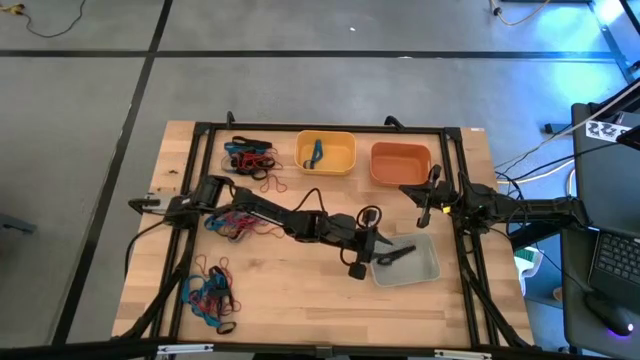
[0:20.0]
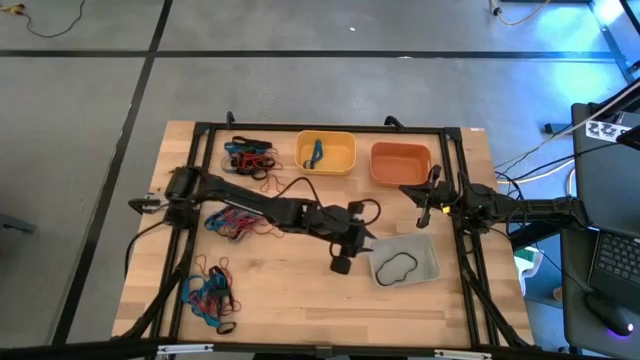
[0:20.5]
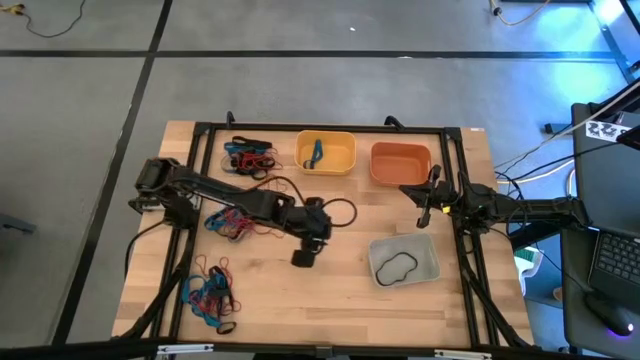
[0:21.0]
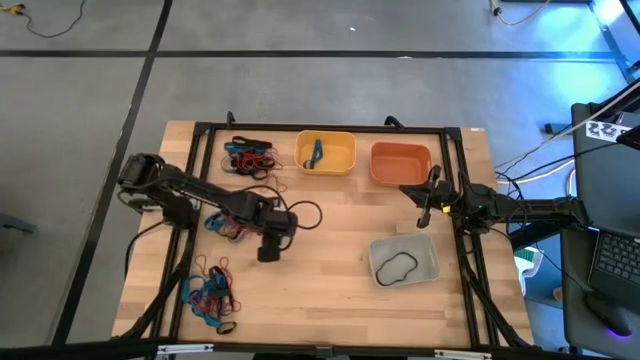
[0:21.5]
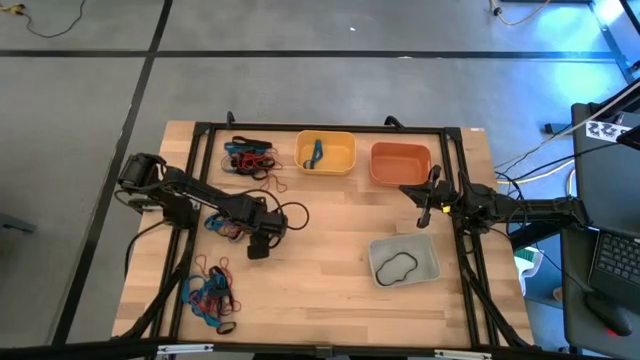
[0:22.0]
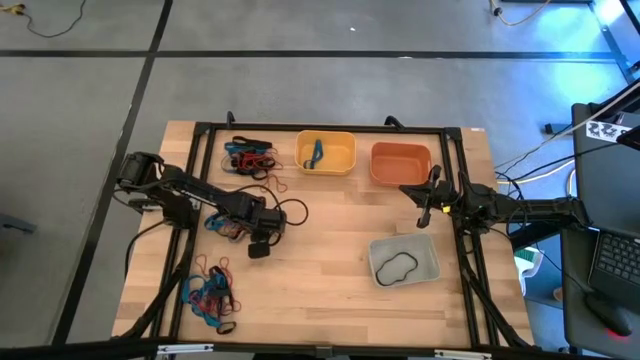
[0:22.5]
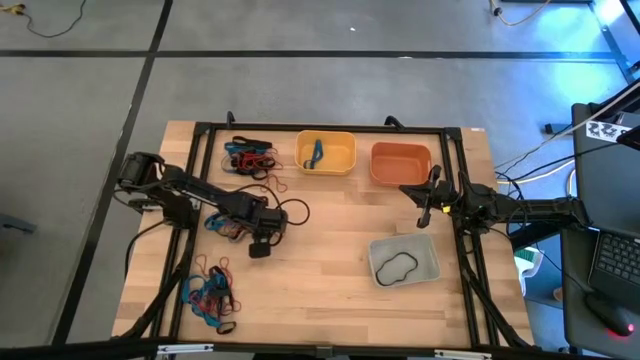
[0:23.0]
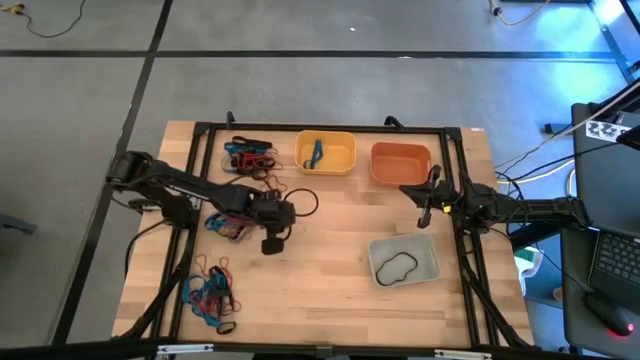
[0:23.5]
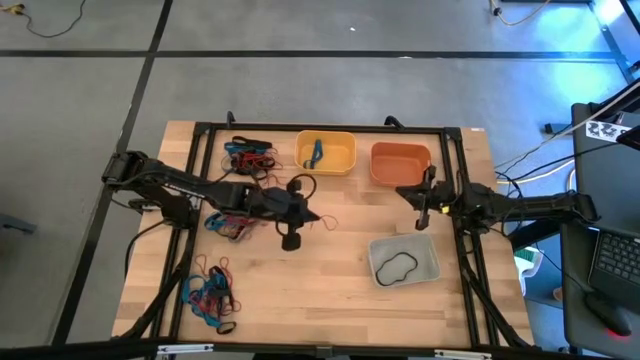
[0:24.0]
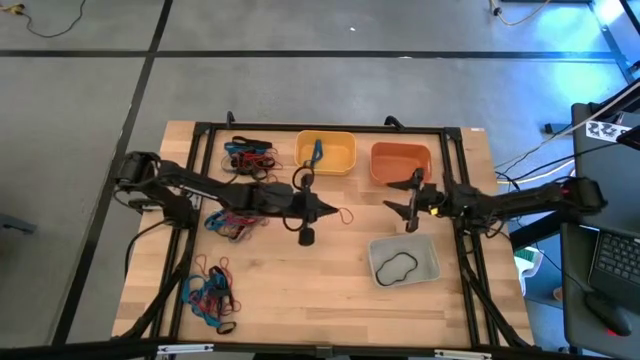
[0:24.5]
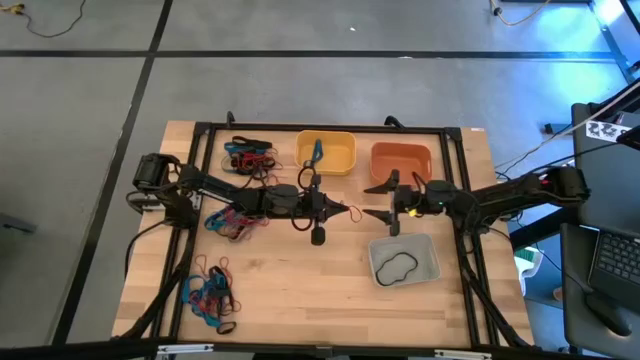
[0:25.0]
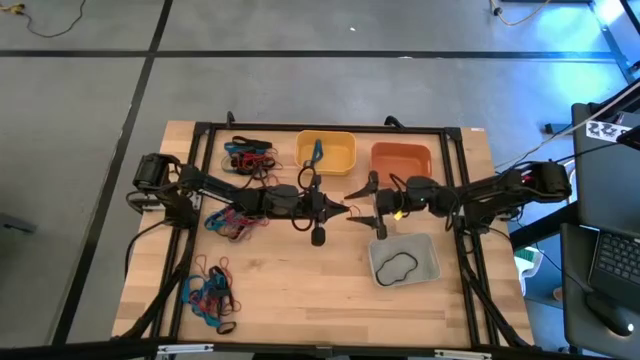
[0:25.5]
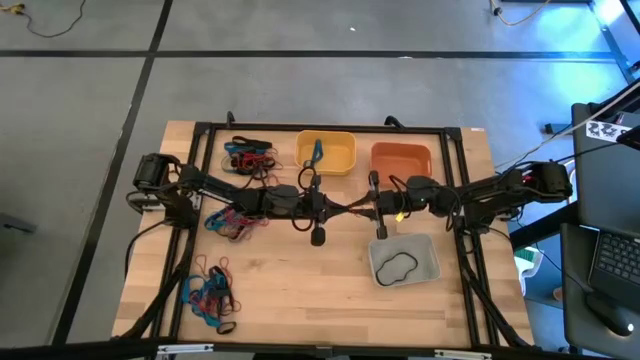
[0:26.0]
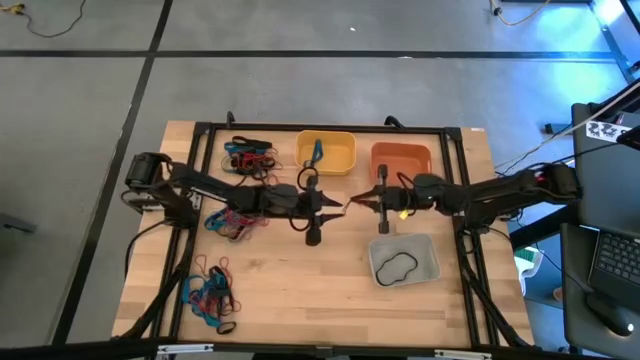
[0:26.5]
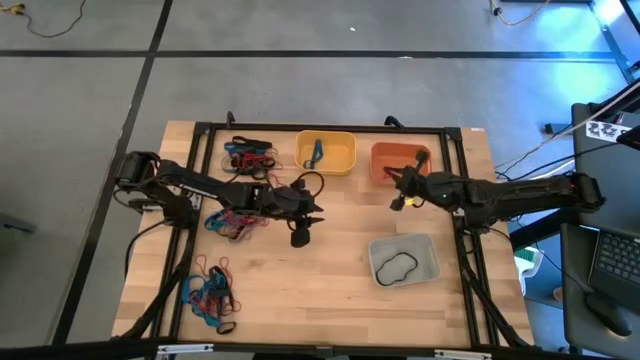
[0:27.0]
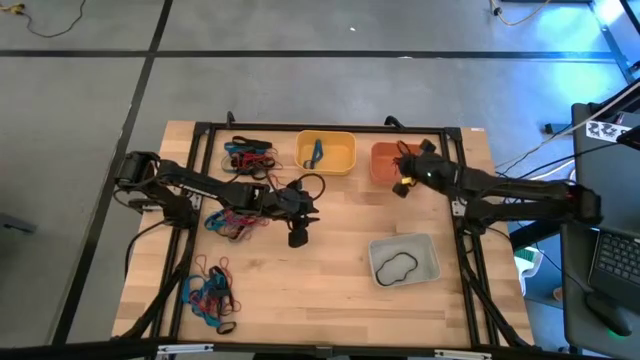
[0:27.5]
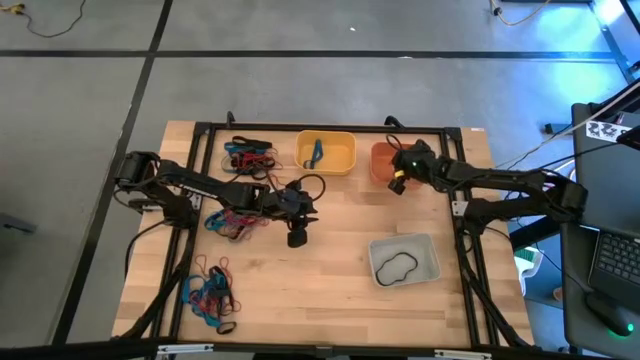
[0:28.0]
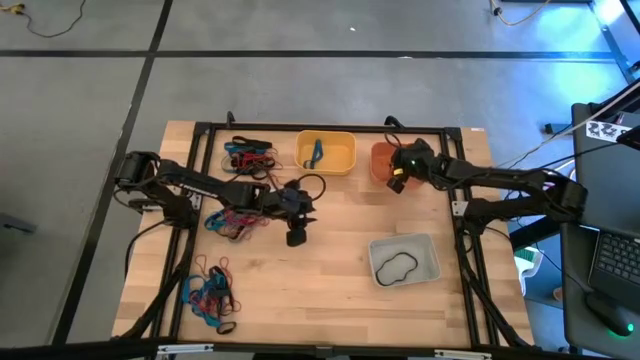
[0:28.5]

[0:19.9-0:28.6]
Task: Sort rubber bands into baskets
Put the red rubber band into the orange bin

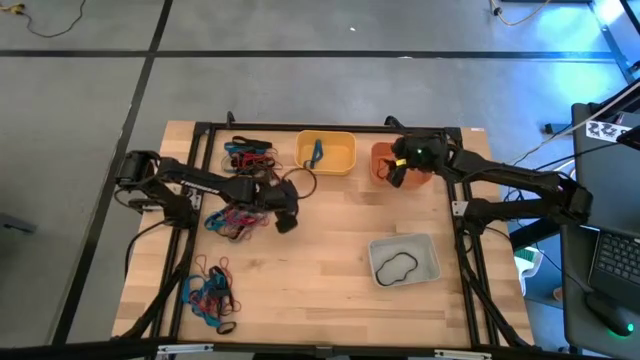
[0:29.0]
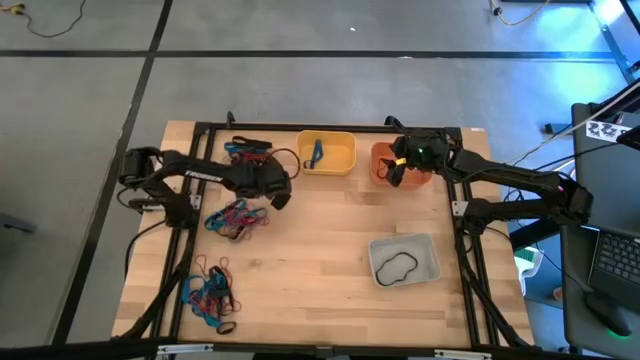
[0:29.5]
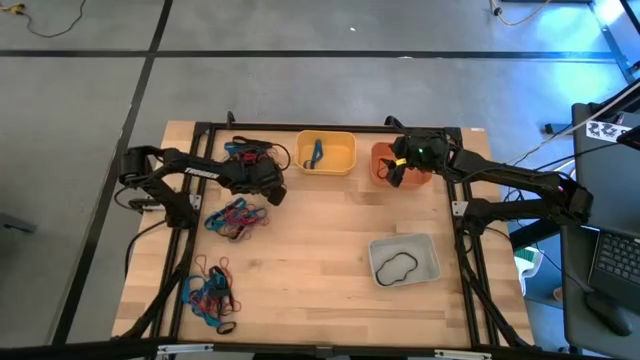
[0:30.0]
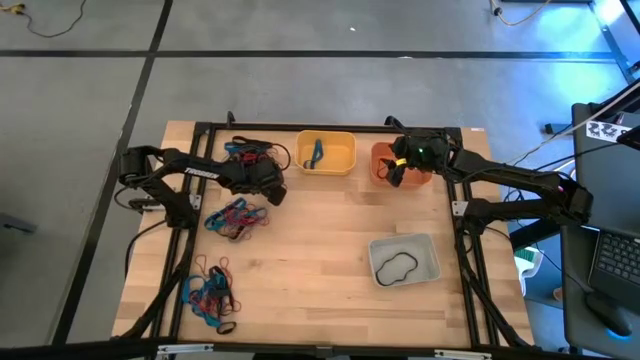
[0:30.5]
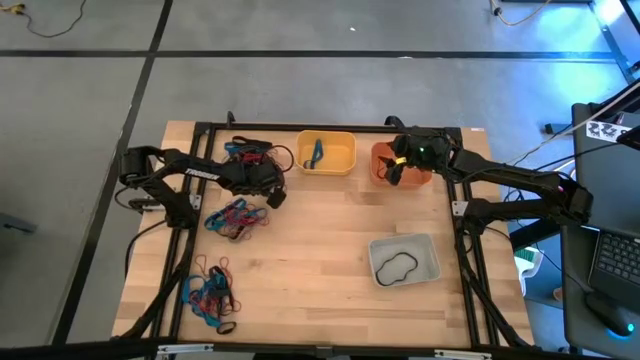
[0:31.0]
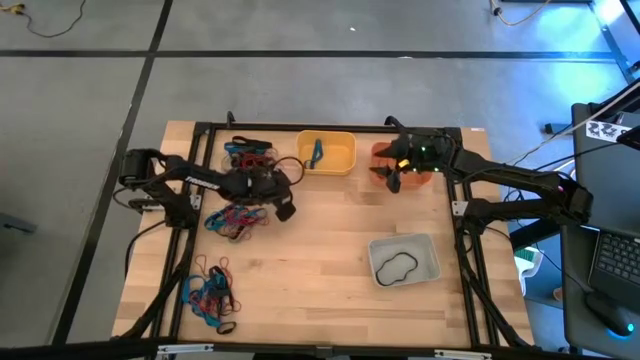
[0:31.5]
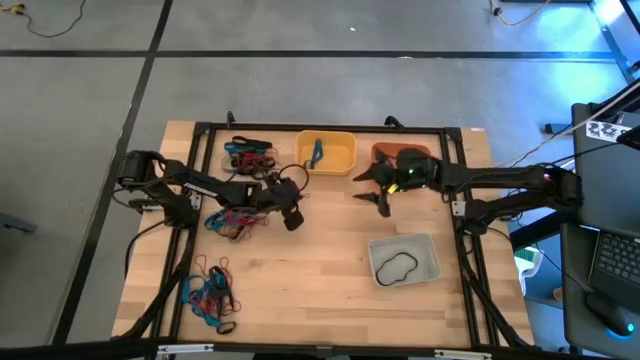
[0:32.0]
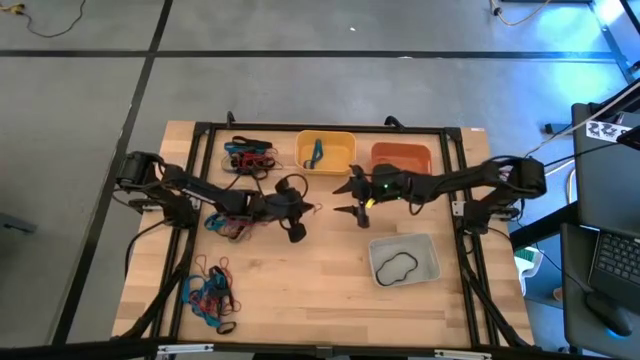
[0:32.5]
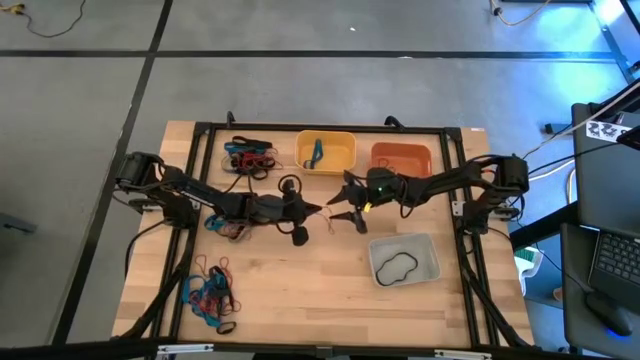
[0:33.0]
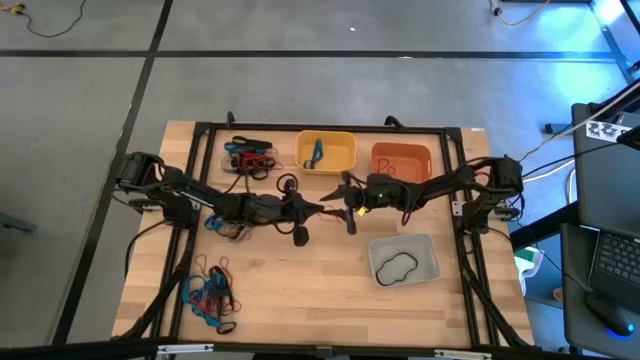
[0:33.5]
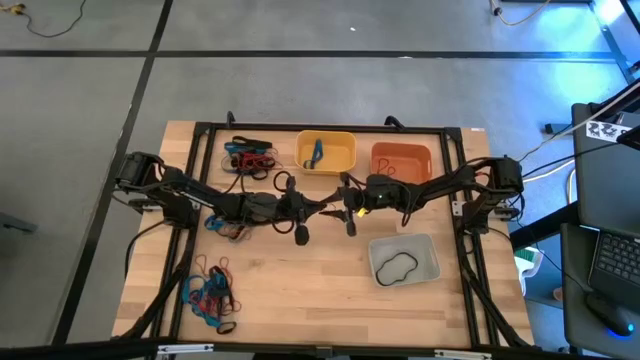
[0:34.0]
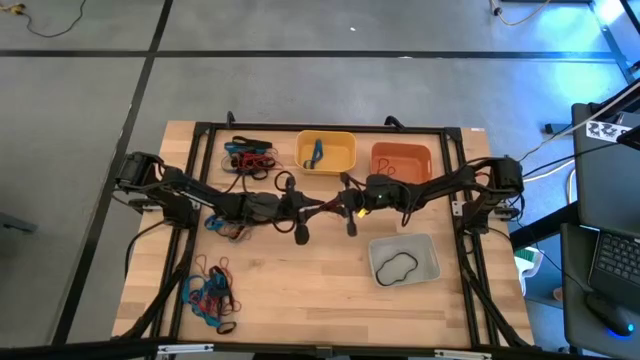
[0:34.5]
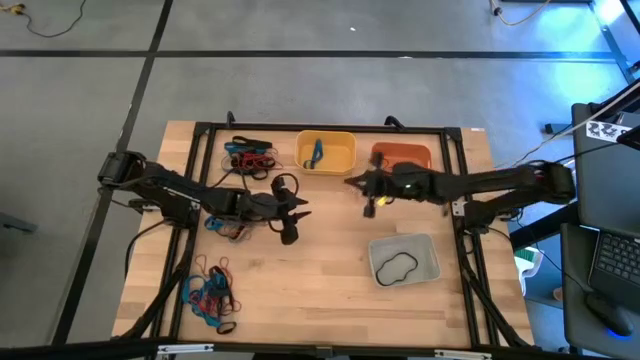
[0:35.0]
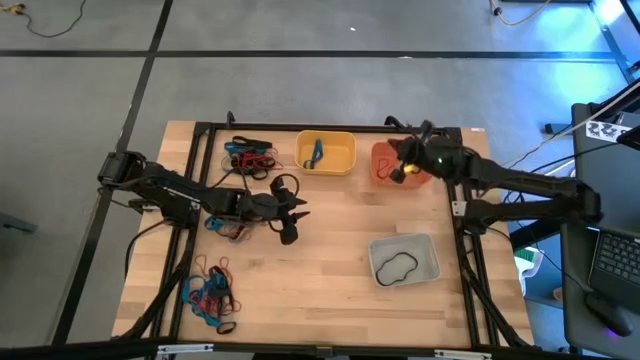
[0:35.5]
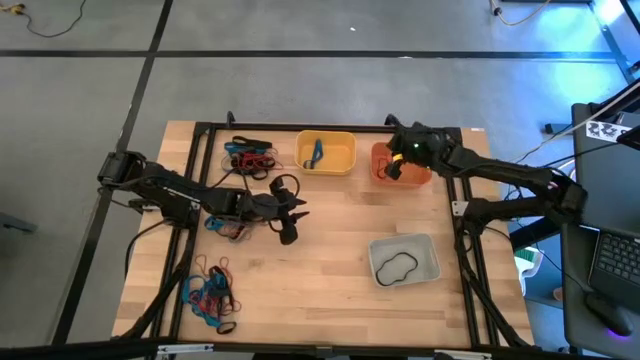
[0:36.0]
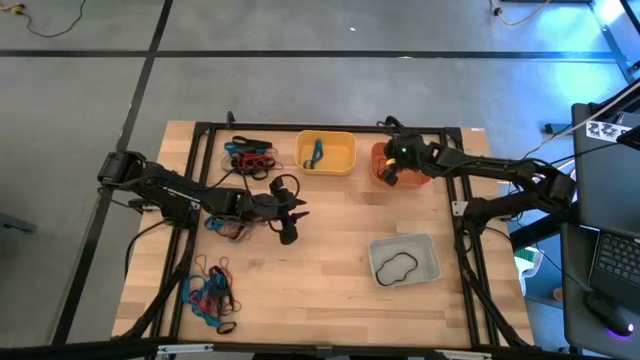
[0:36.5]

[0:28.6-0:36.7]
Put the red rubber band into the orange bin

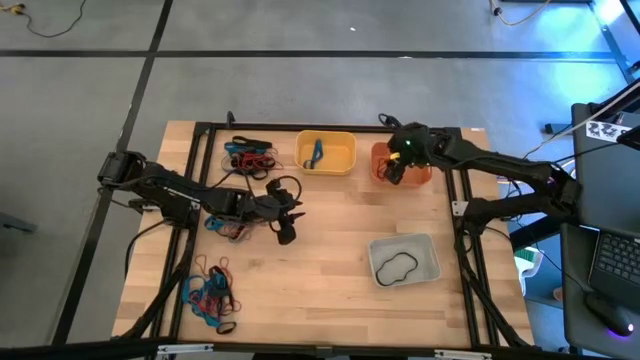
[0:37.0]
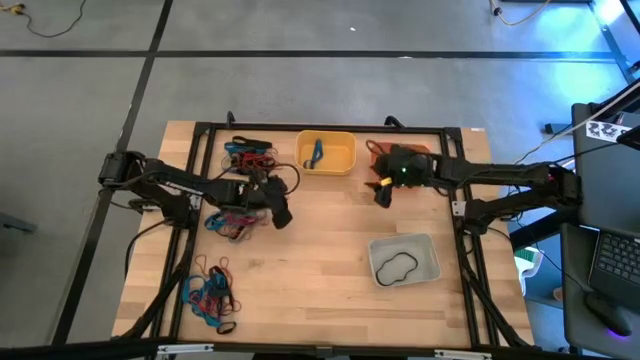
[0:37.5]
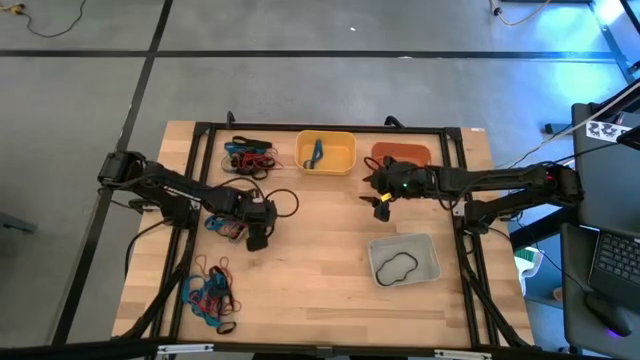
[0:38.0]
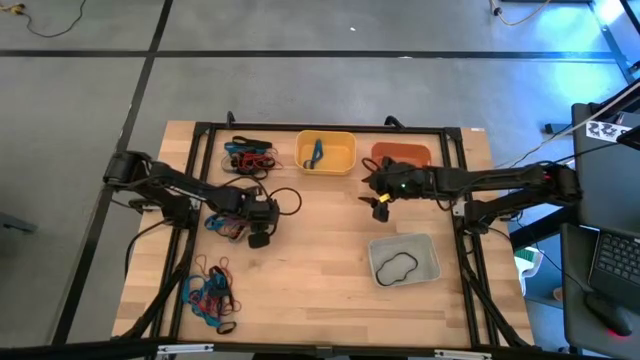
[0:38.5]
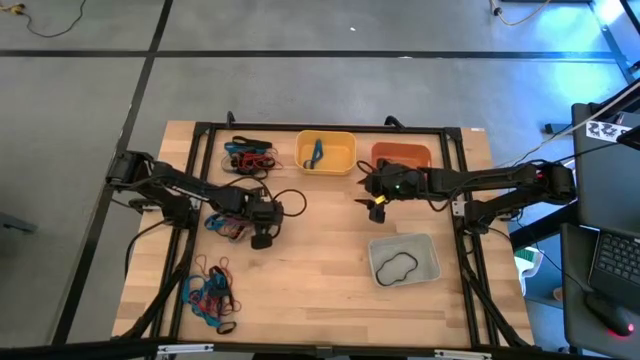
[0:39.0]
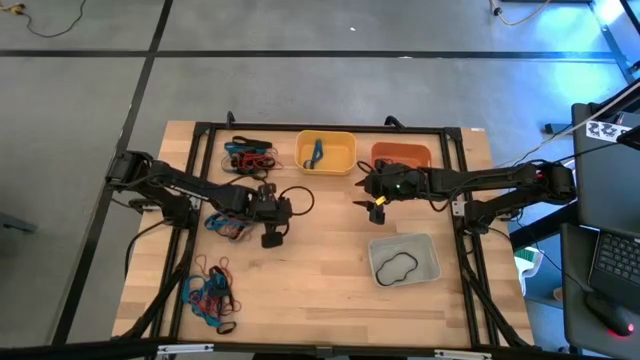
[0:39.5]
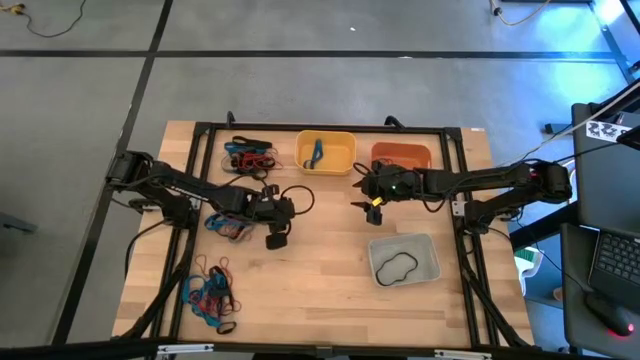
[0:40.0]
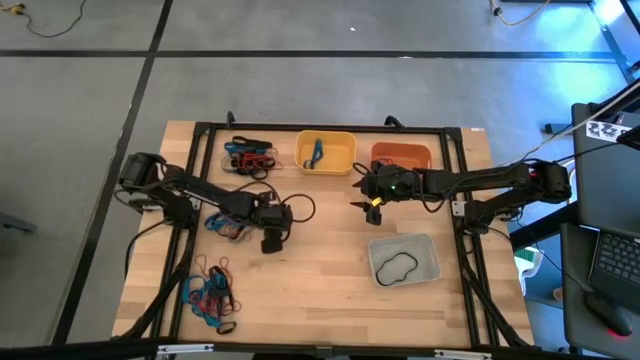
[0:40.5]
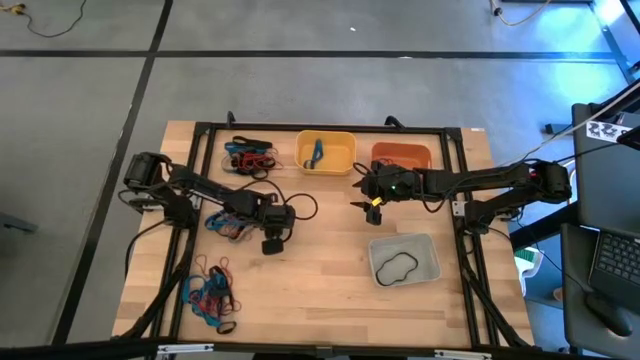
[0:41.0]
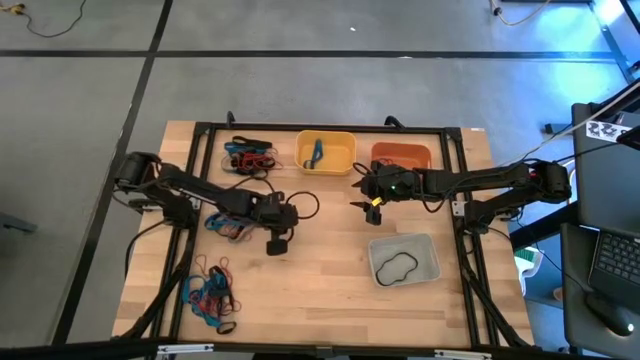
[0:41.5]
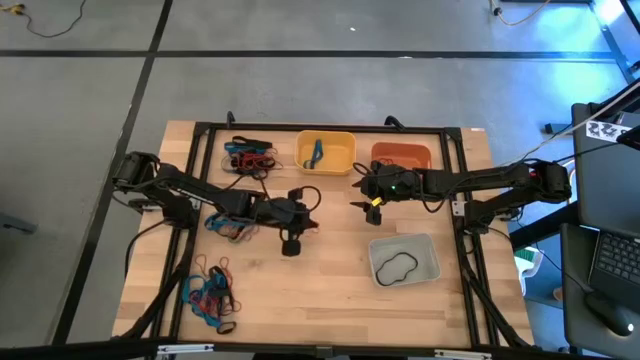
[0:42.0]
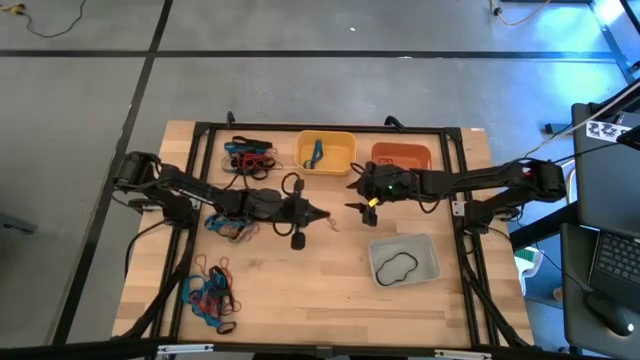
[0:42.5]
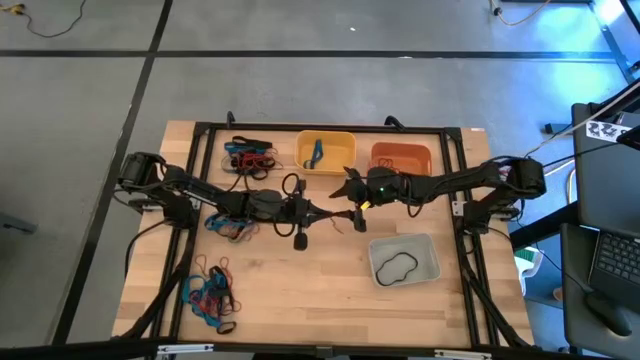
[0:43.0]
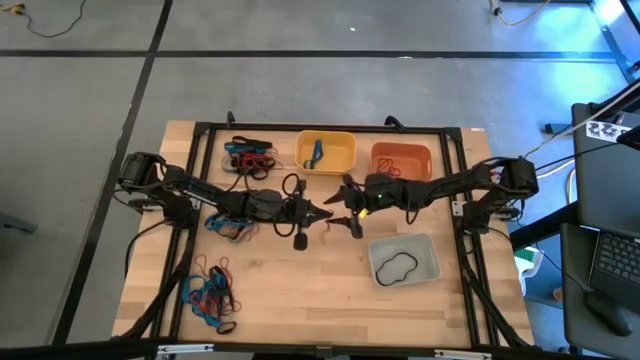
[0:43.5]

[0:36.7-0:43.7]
Put the red rubber band into the orange bin
